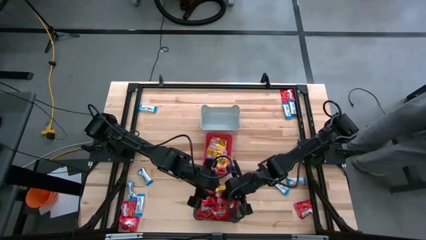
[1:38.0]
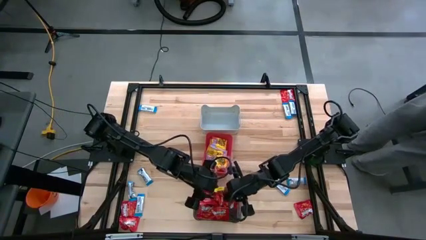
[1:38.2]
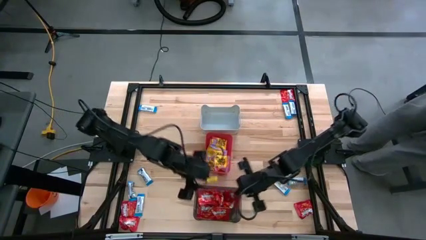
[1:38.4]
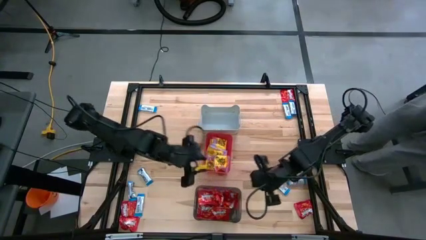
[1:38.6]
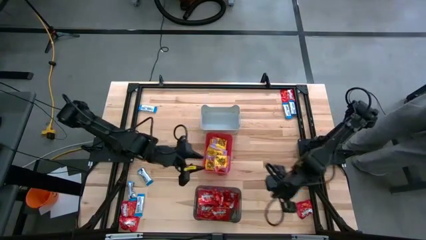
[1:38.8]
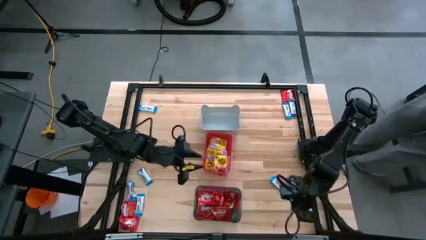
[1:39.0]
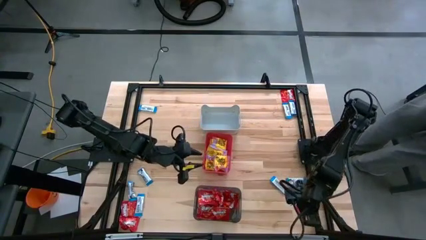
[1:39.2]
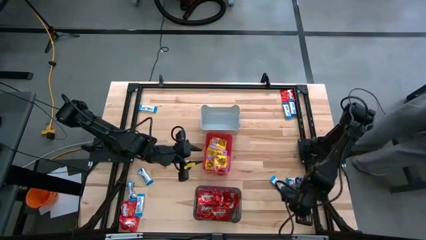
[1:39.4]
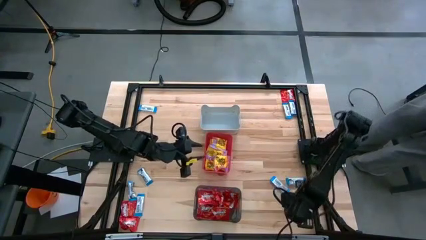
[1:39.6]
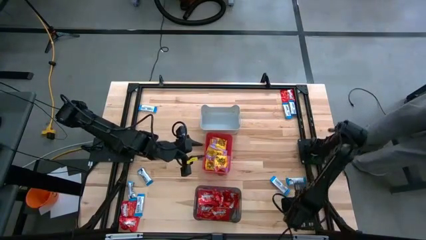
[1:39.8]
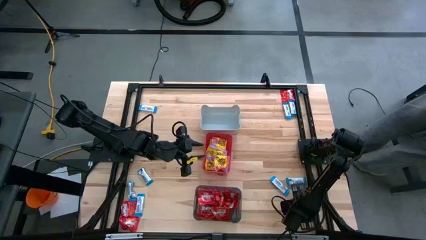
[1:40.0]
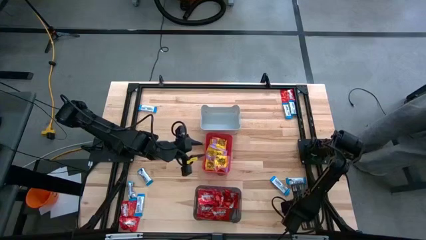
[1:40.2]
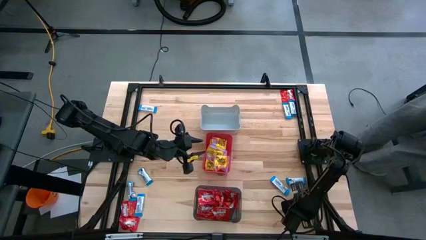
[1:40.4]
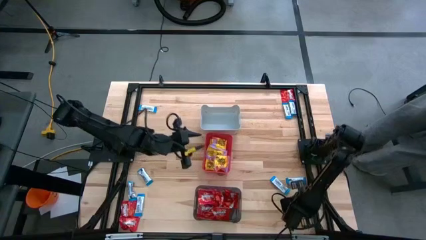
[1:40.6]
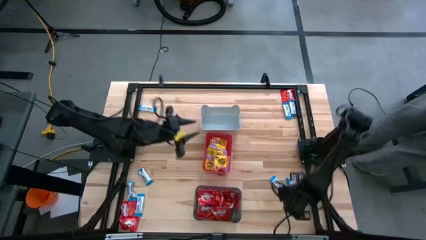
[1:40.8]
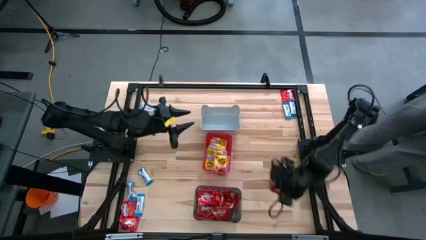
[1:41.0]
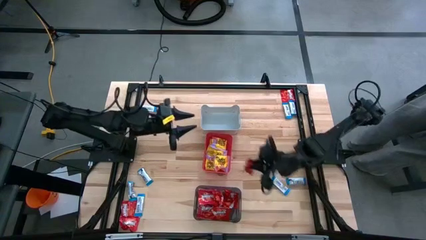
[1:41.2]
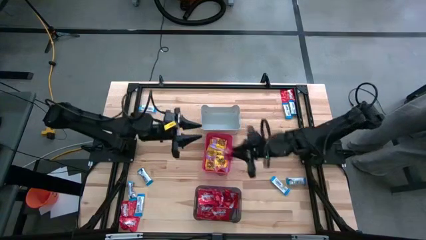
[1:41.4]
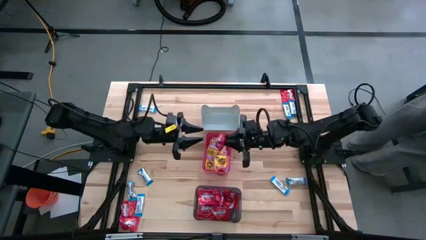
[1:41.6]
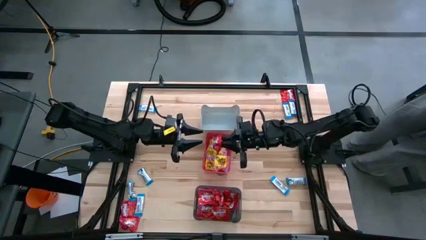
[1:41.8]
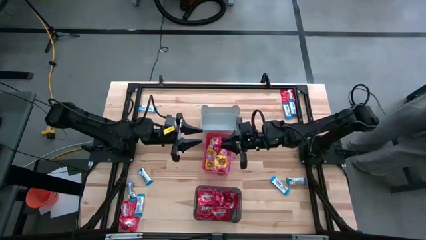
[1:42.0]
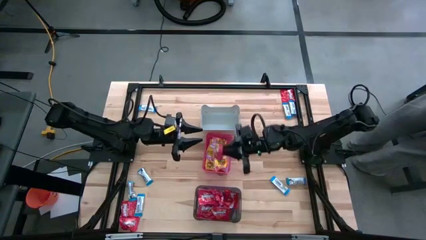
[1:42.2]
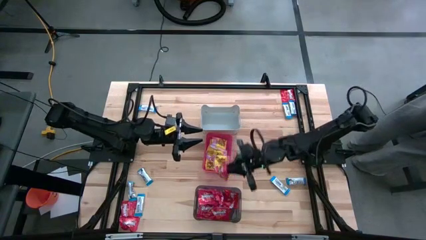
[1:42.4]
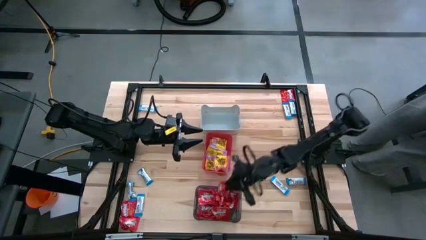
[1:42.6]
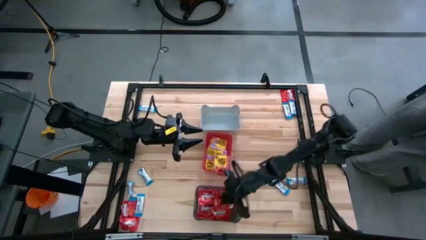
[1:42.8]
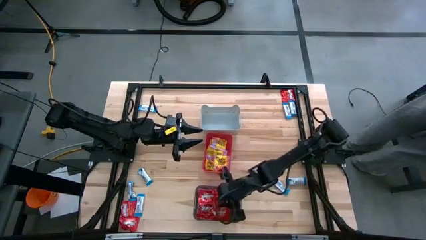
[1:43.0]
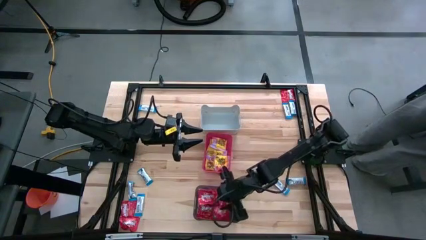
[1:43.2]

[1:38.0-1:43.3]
Task: Sort candy
Put the red candy into the black bin

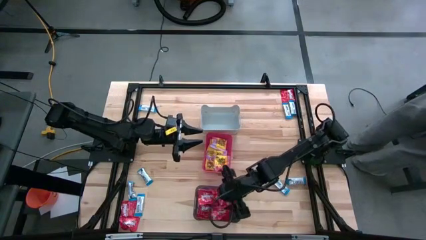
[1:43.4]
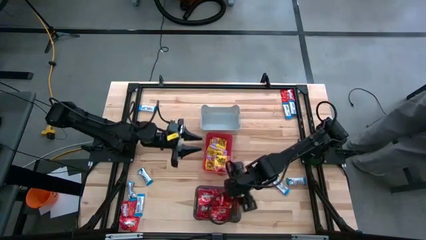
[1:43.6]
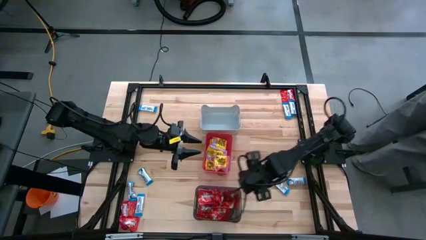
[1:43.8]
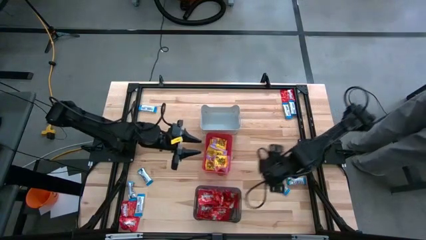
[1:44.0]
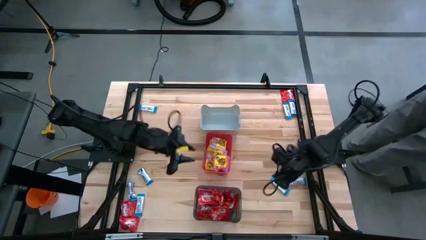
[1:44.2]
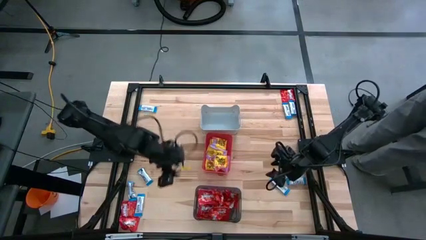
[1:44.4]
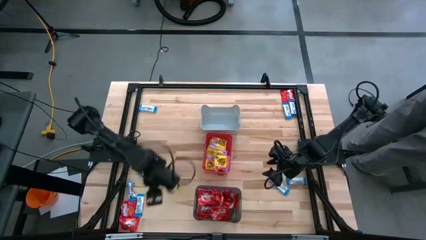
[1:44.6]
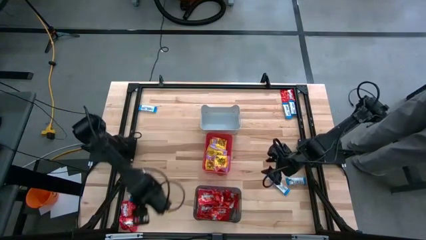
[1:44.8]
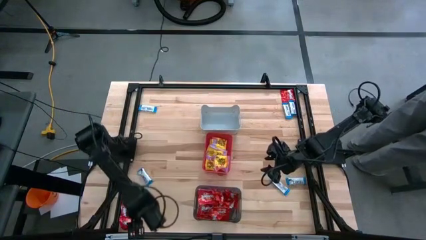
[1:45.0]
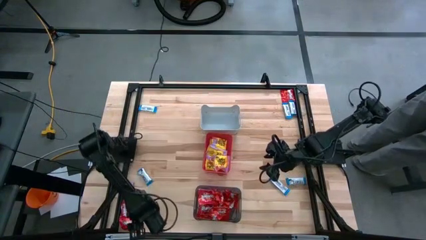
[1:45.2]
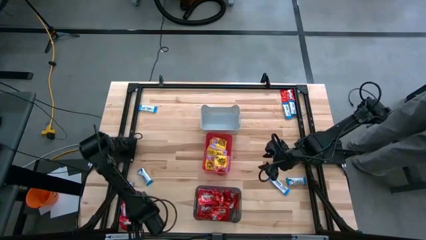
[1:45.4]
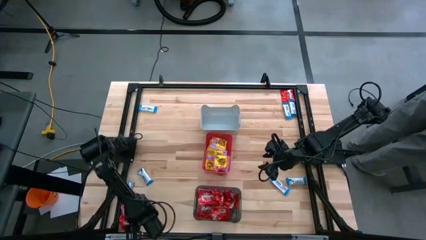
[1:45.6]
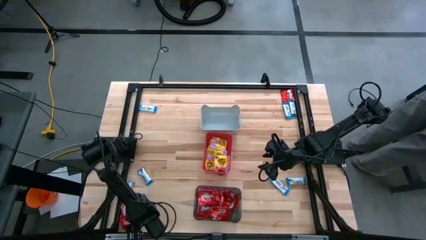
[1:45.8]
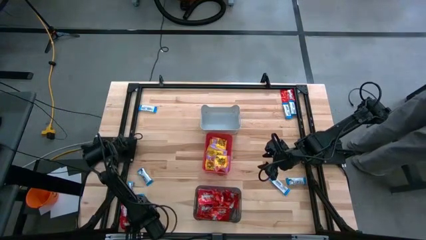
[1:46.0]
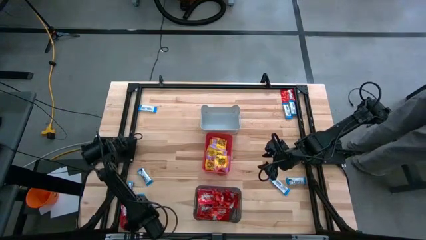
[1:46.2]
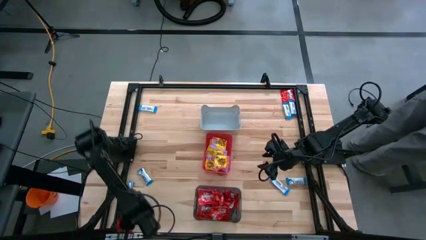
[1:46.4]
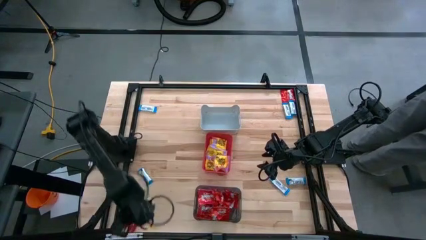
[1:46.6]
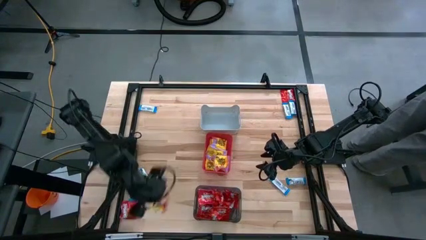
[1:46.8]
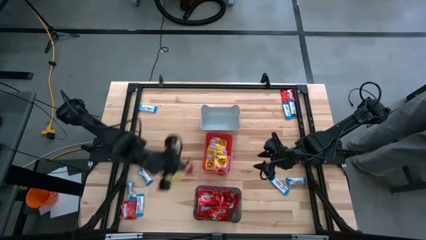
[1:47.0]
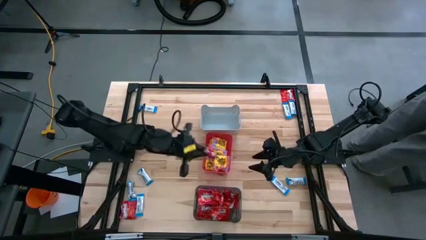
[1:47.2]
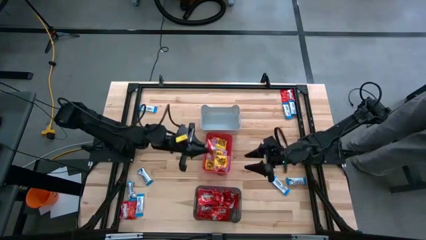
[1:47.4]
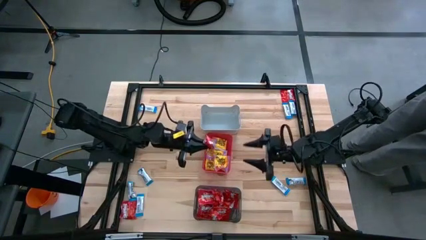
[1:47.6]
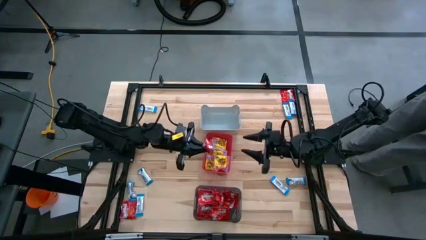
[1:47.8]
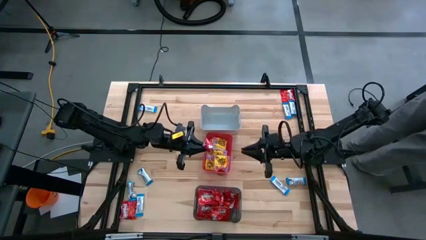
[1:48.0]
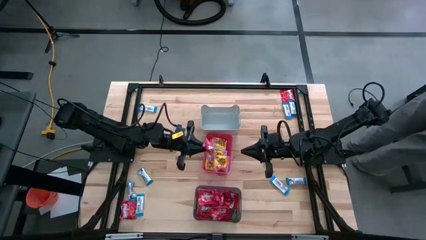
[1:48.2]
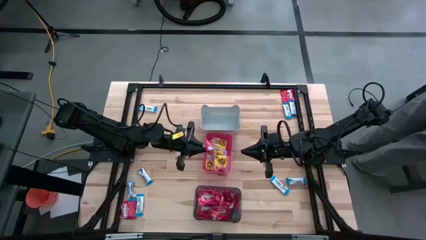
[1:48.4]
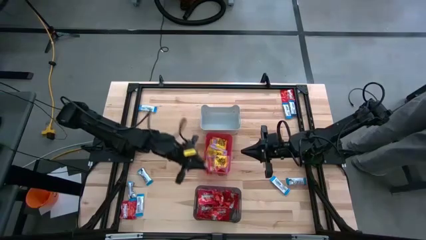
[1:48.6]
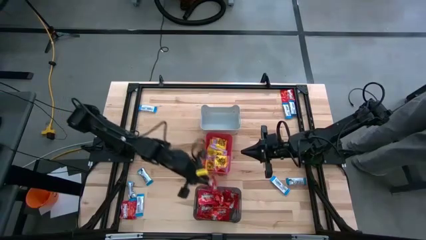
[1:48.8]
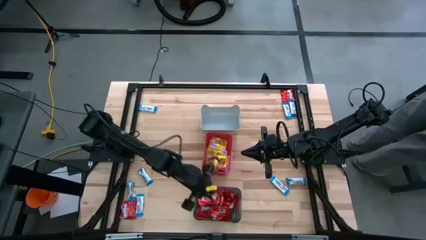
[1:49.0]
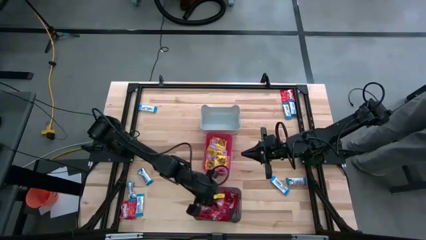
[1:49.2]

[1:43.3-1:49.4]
Put the red candy into the black bin

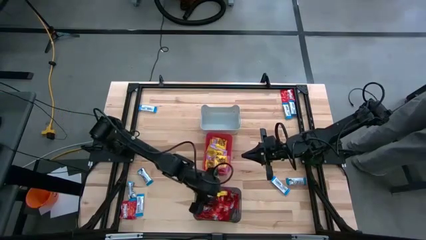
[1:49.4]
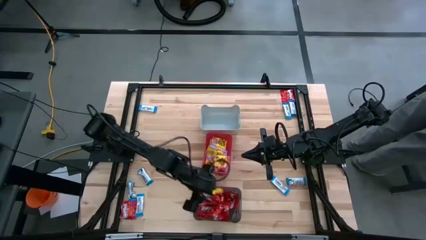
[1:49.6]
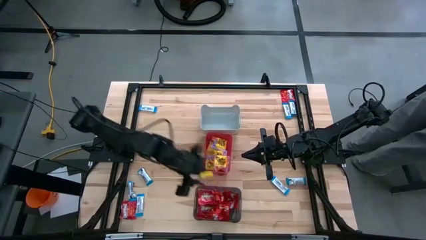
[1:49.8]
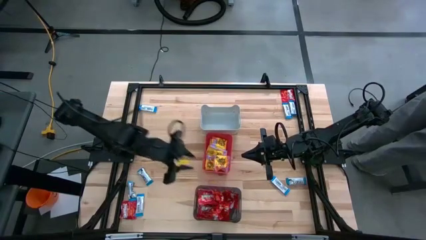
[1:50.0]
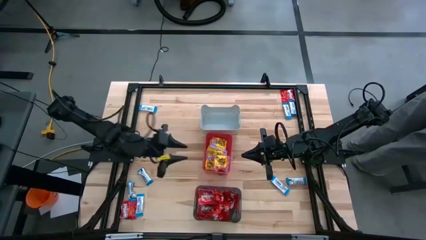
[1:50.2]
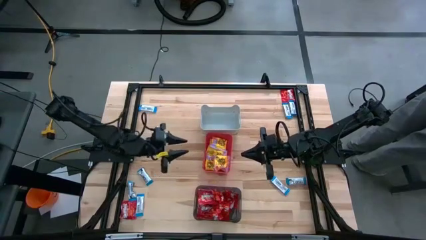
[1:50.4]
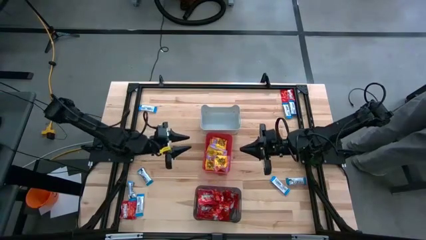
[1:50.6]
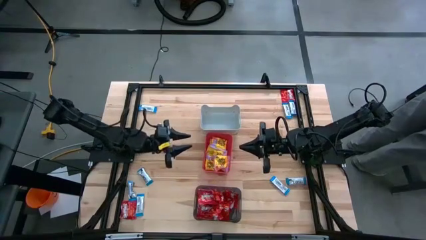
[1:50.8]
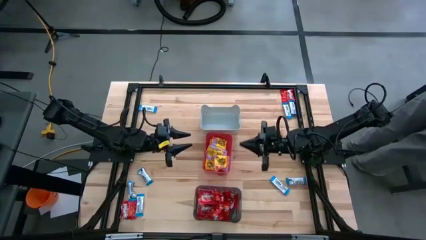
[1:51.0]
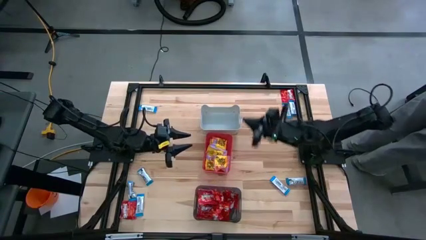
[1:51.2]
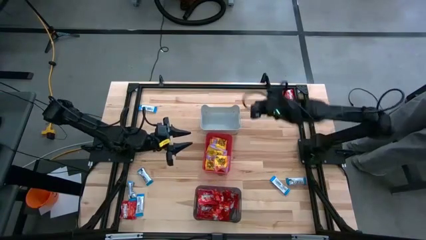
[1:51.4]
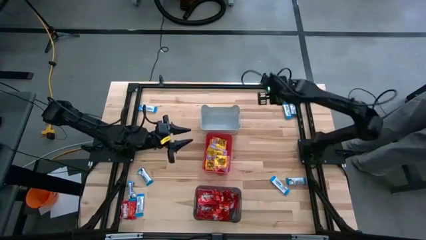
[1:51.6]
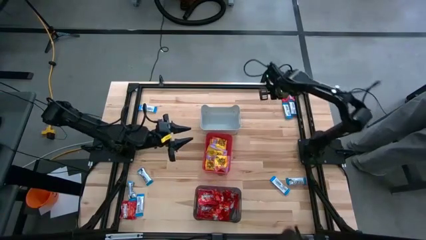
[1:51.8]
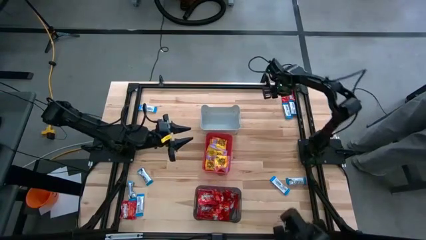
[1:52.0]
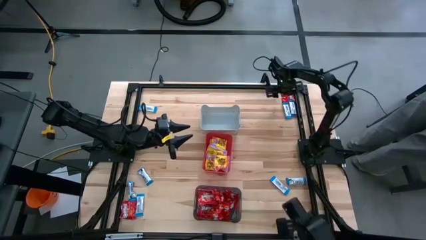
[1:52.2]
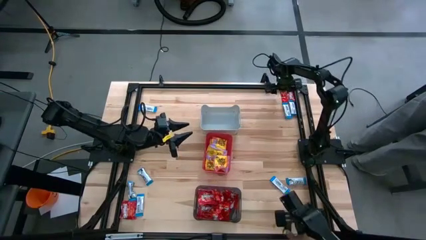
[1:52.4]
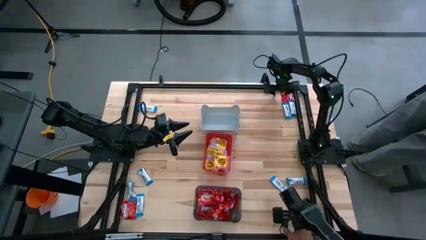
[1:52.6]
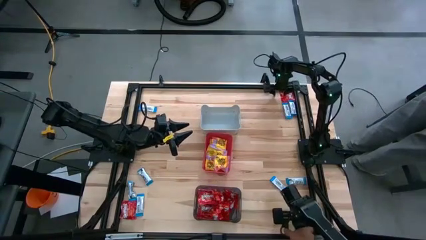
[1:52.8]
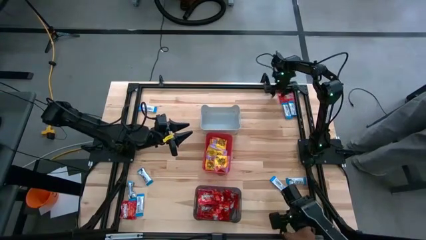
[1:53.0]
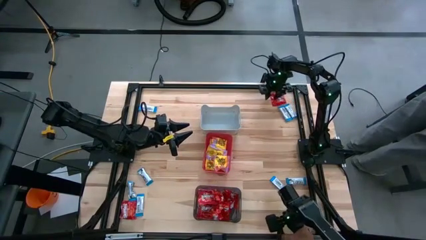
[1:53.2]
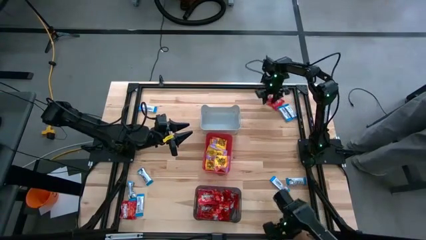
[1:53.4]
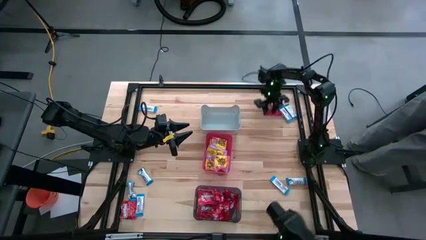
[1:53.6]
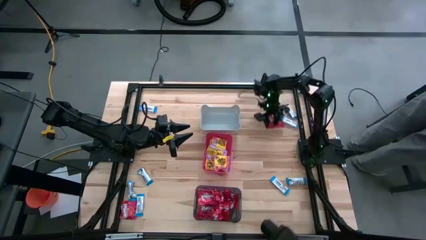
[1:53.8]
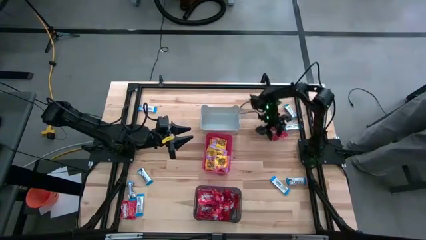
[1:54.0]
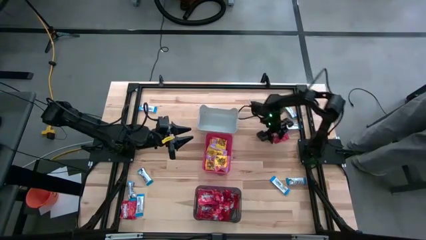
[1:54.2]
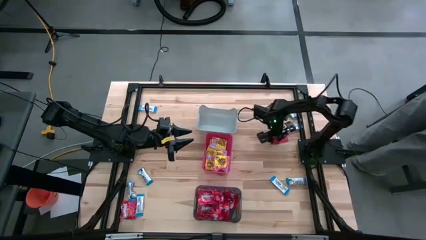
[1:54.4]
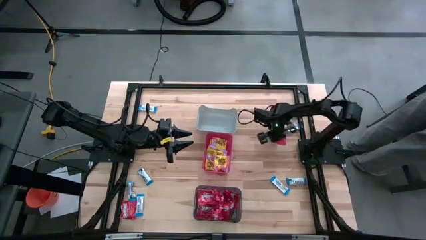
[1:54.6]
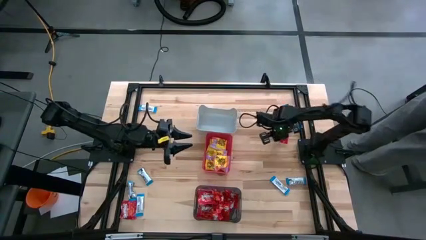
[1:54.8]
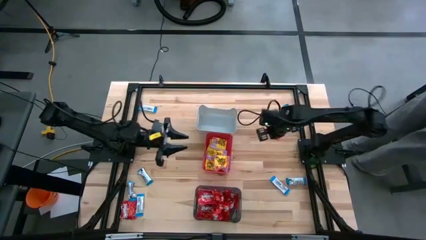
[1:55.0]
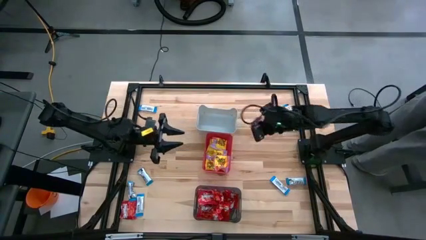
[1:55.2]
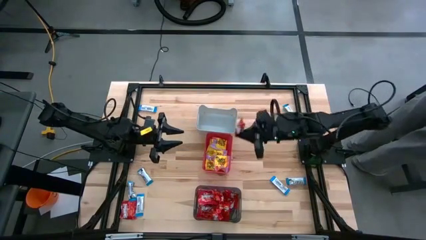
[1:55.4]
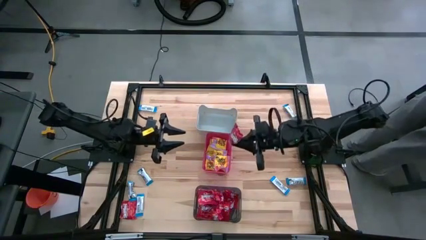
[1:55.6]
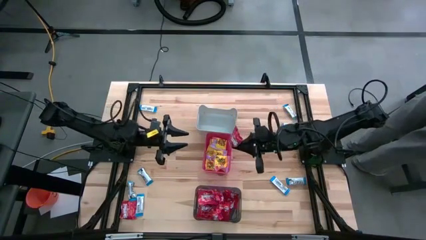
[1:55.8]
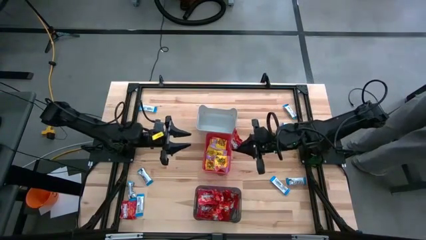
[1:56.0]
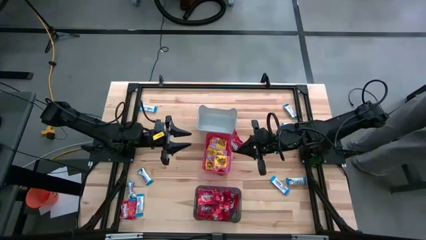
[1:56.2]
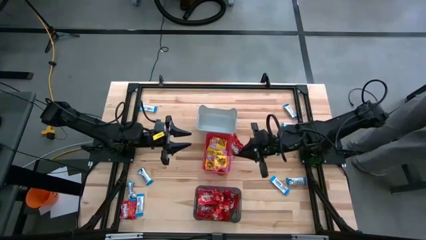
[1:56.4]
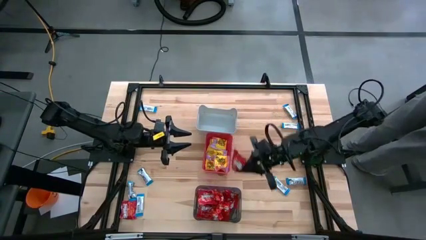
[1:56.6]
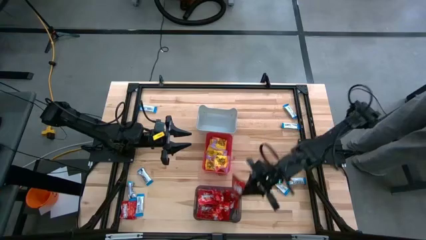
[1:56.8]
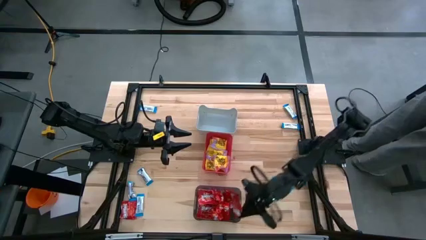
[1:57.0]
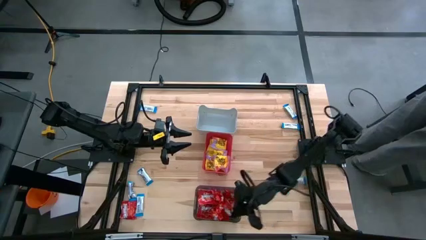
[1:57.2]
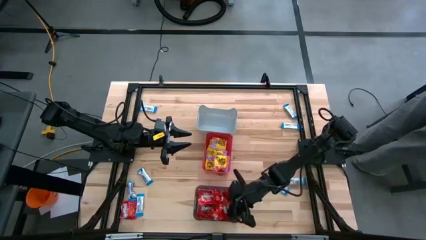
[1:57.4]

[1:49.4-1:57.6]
Put the red candy into the black bin
